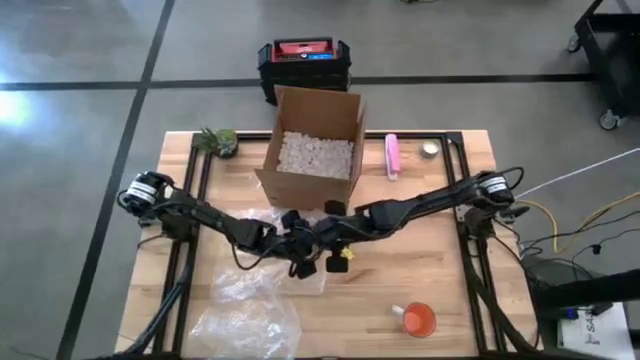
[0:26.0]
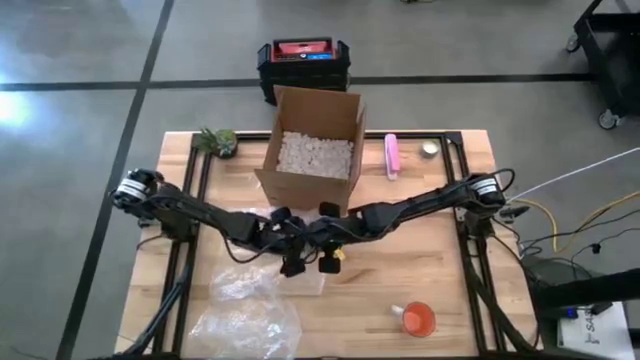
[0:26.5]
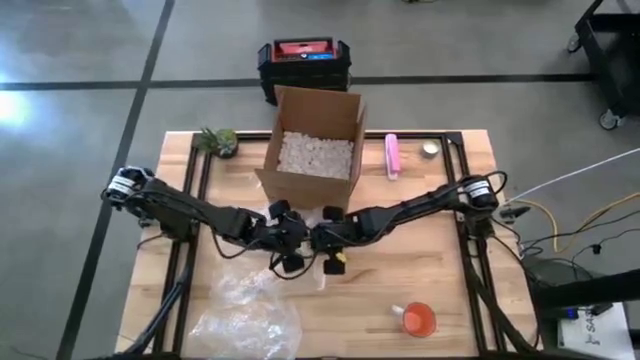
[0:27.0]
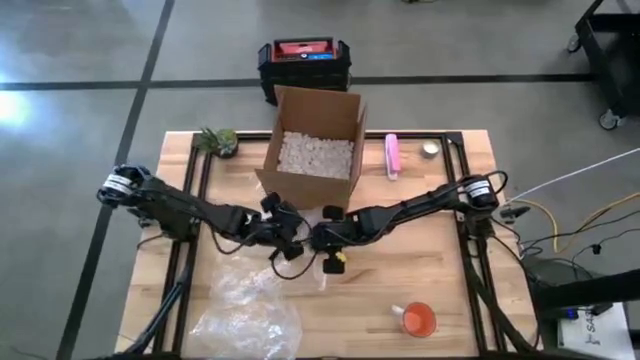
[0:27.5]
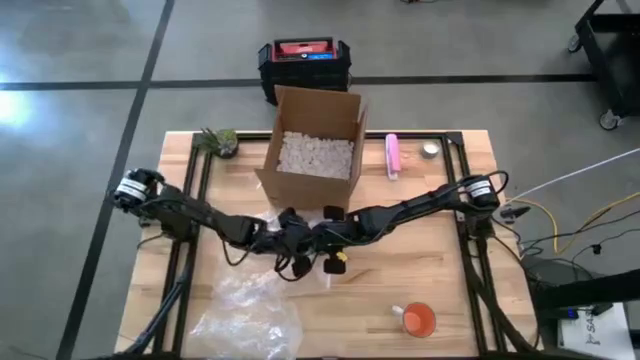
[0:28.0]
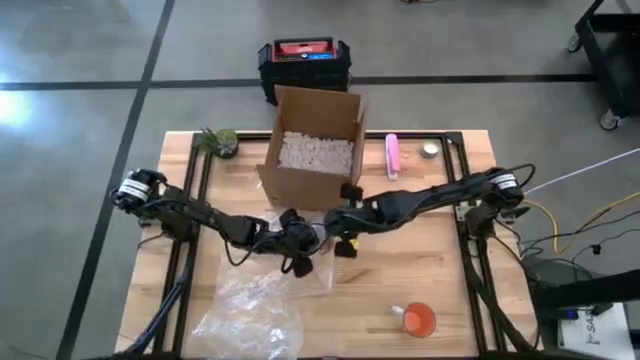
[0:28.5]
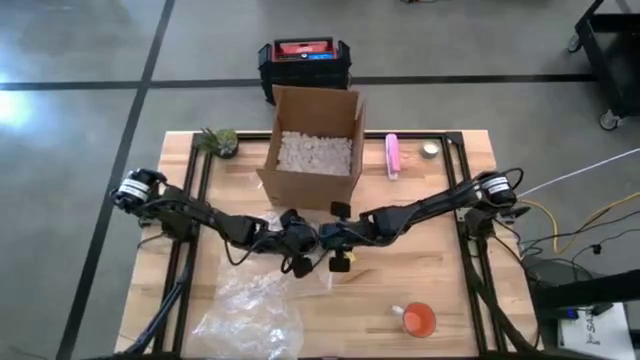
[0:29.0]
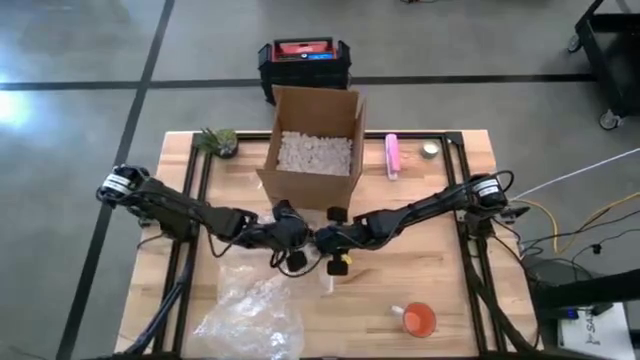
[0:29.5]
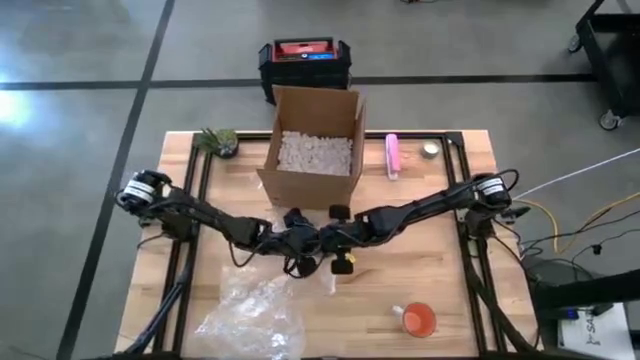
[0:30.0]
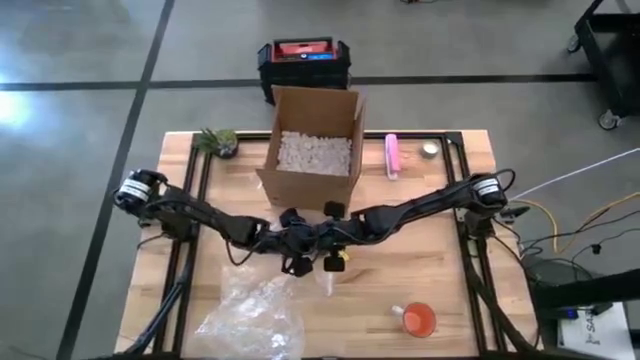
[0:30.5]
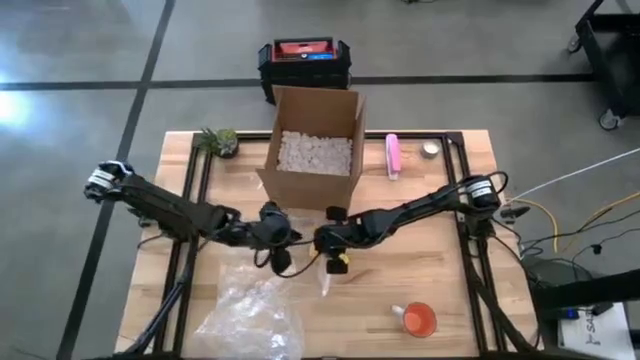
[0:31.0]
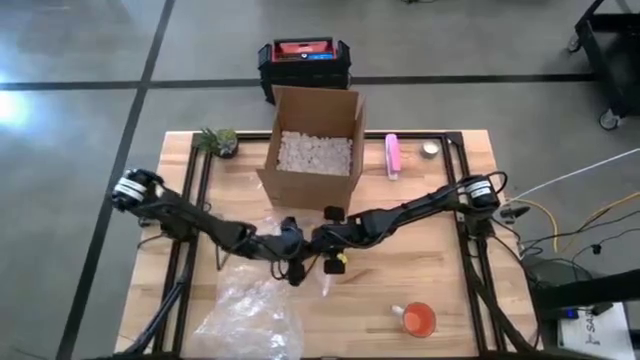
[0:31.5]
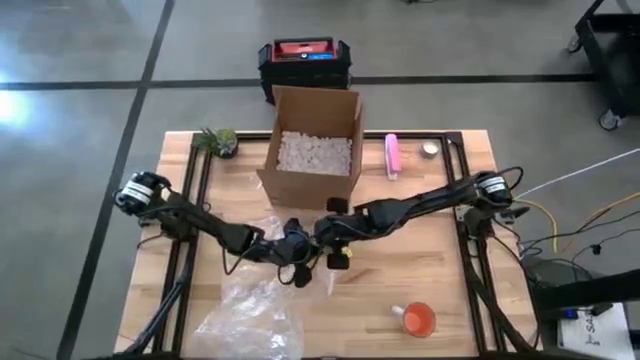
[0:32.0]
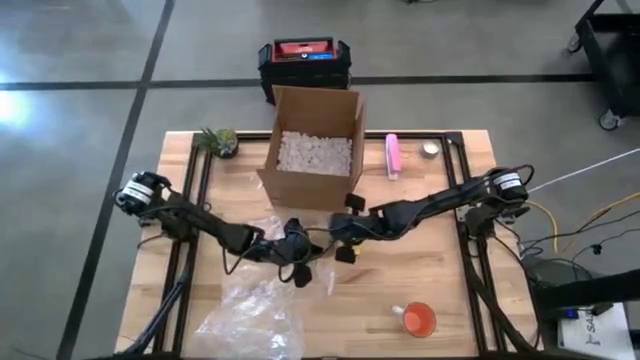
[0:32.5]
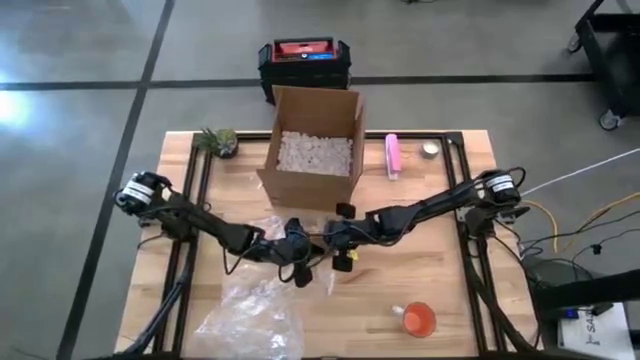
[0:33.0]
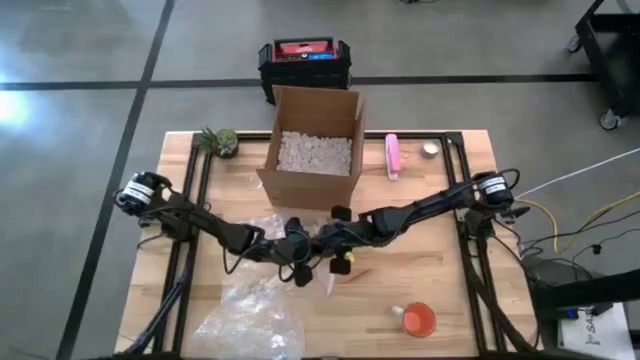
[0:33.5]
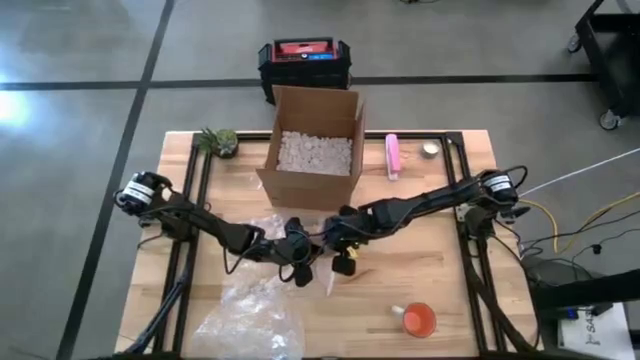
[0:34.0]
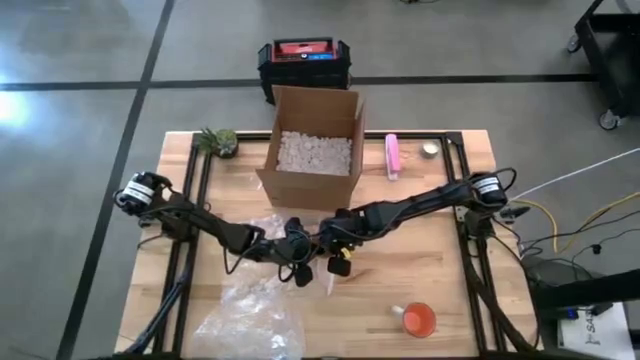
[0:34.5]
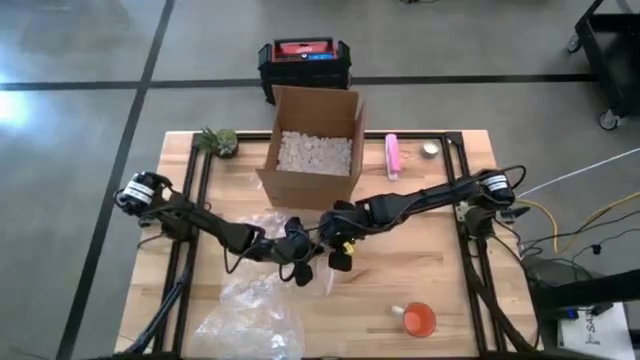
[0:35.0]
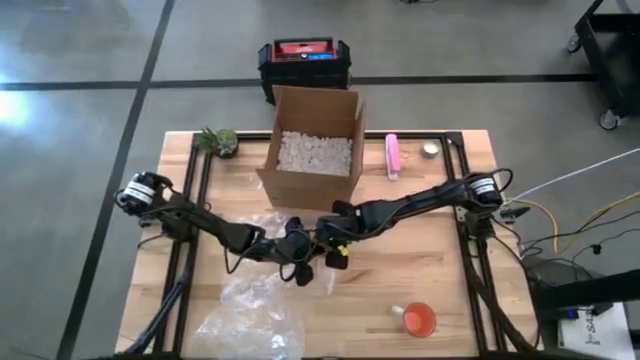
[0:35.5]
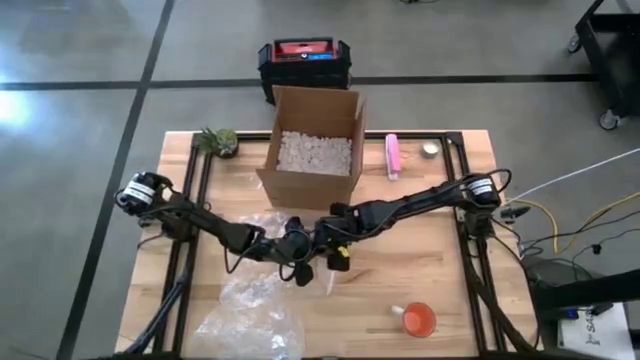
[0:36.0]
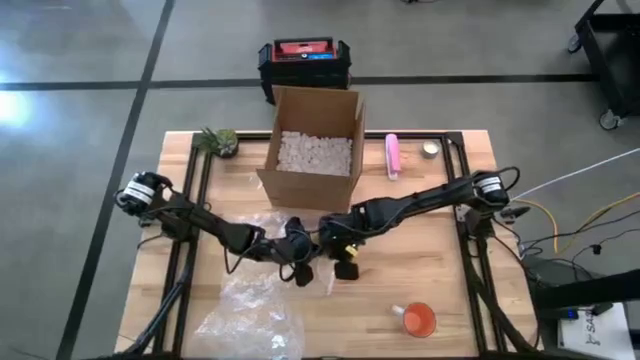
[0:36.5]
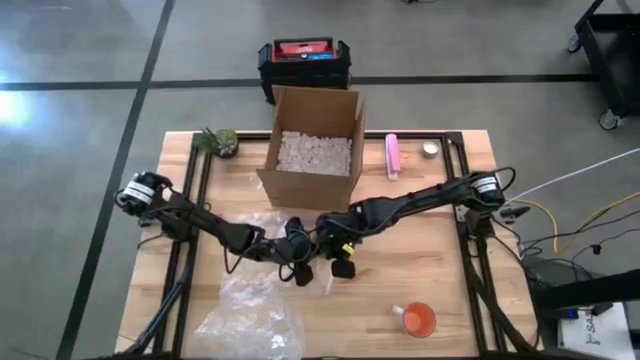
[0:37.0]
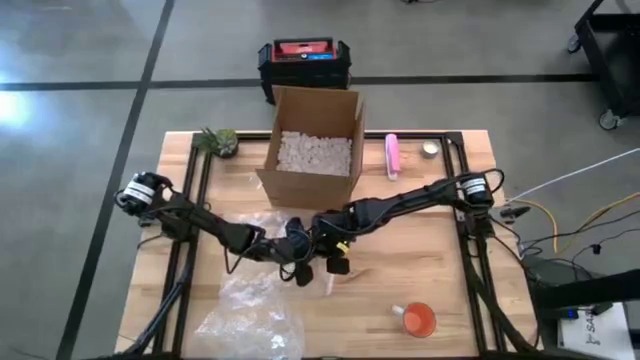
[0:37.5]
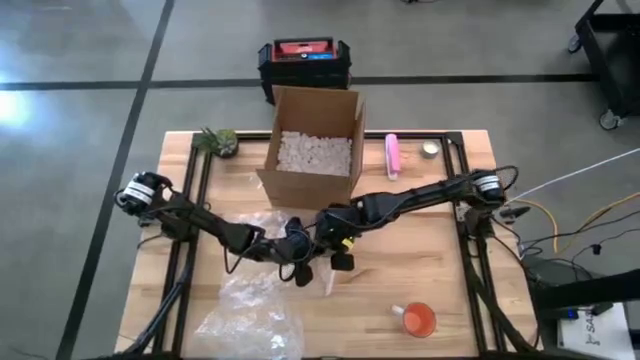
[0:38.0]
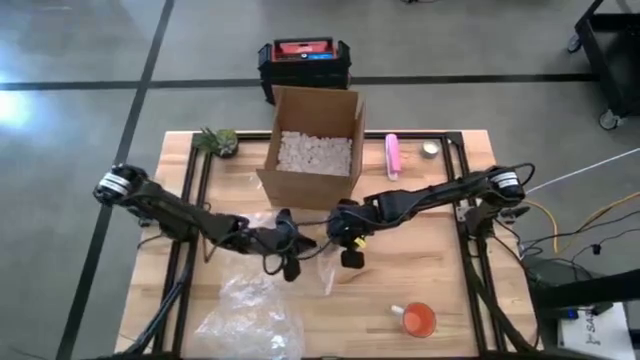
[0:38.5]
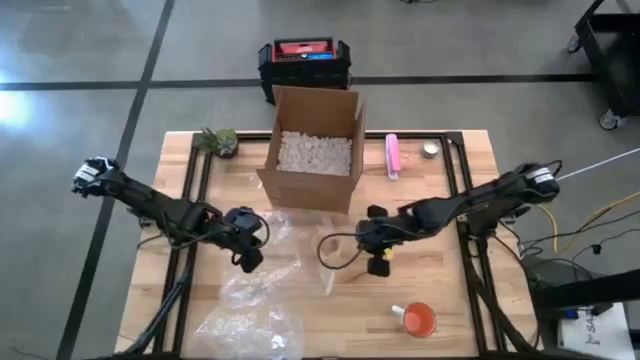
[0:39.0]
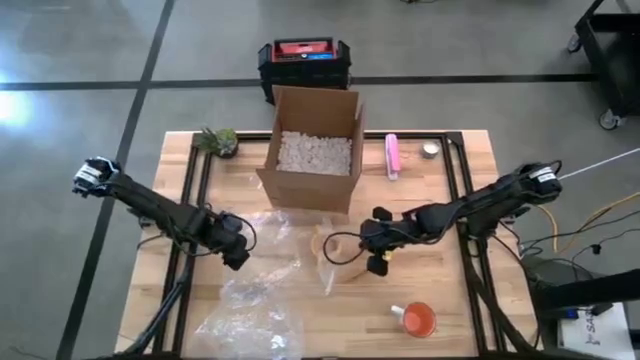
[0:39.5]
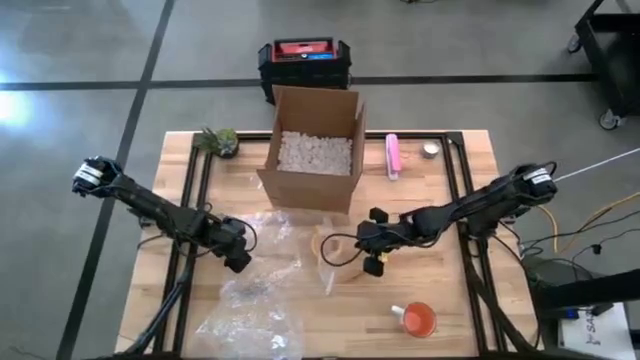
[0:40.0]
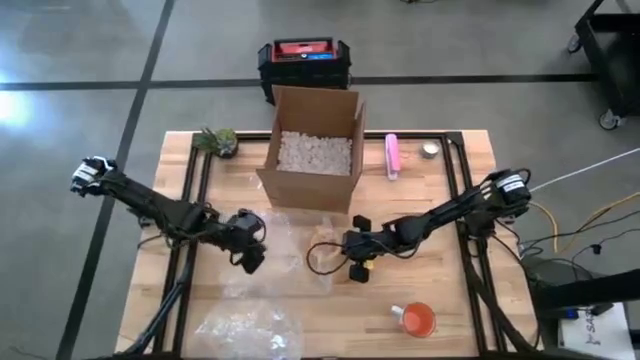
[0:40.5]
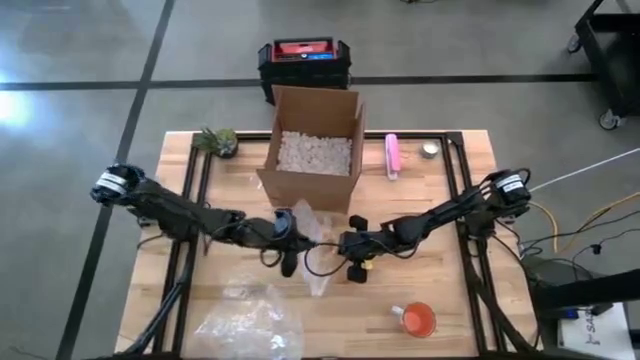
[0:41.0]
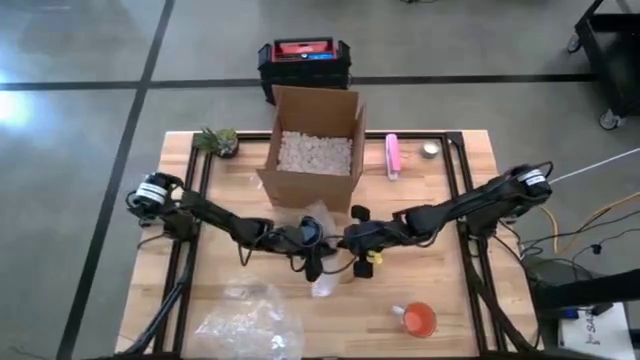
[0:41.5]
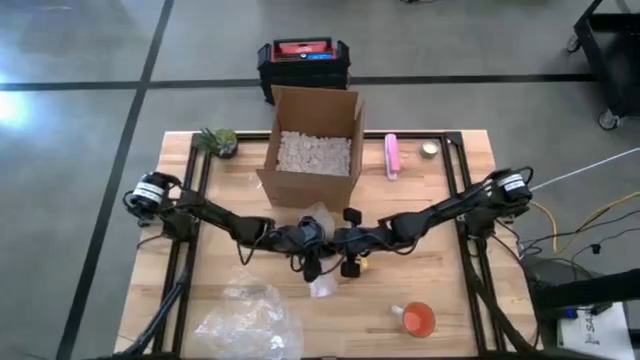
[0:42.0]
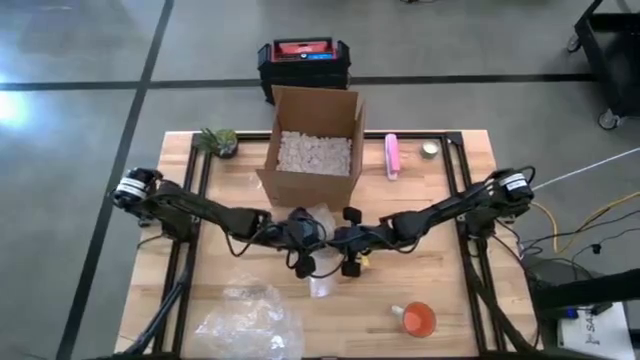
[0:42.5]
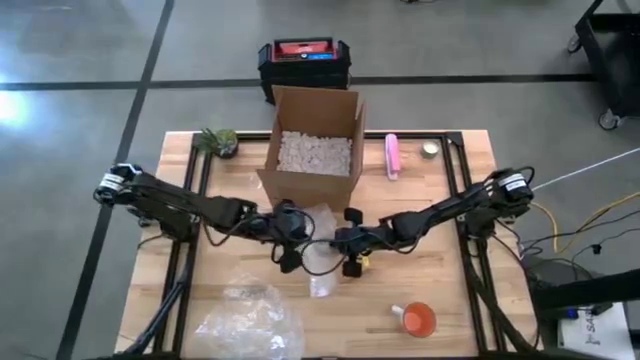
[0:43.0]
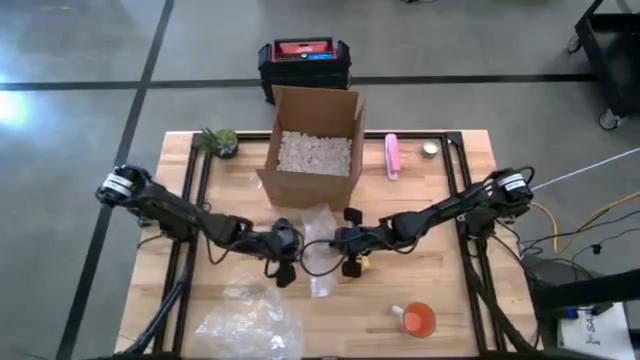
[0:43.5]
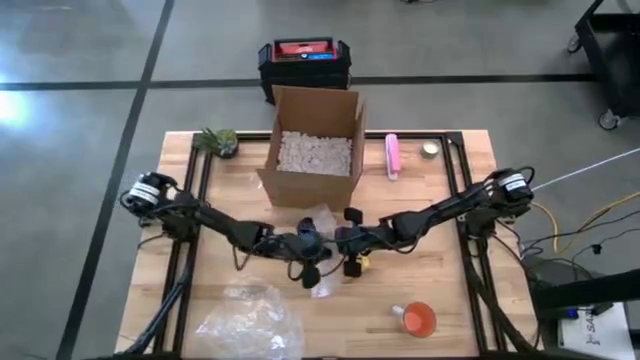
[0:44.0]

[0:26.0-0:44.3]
Task: wrap mug
Wrap the yellow mug with transparent bubble wrap

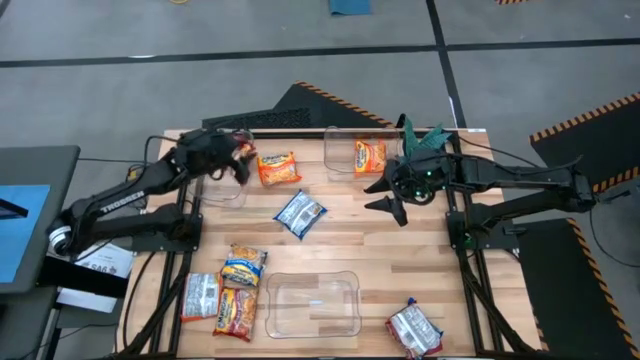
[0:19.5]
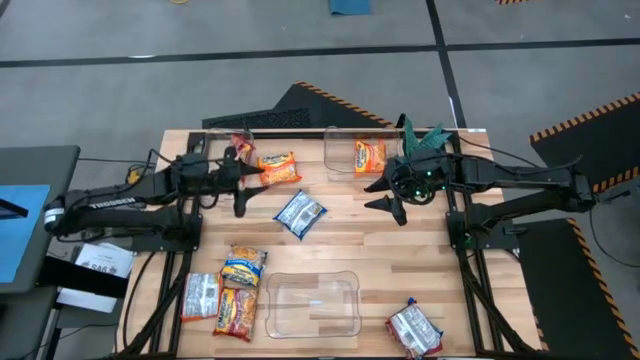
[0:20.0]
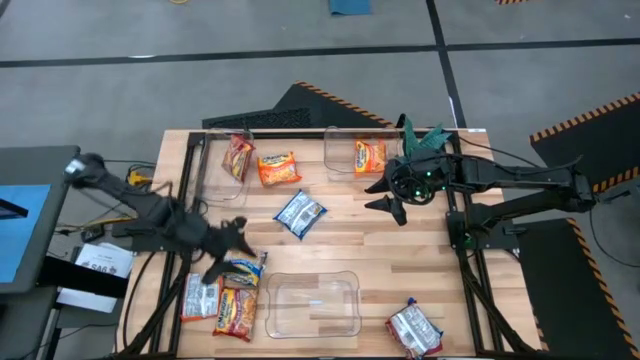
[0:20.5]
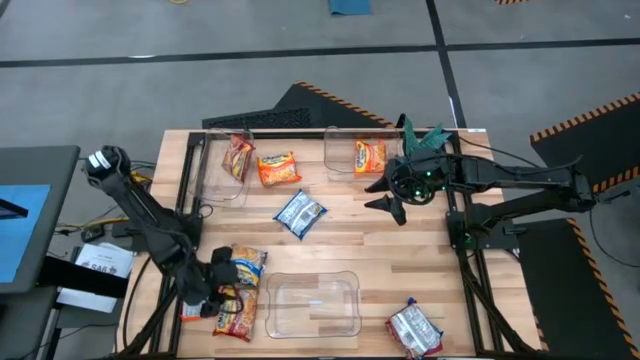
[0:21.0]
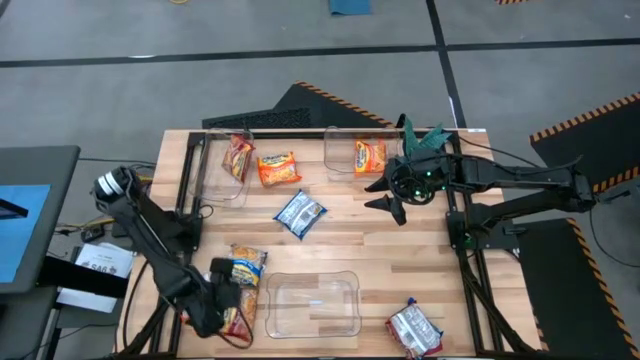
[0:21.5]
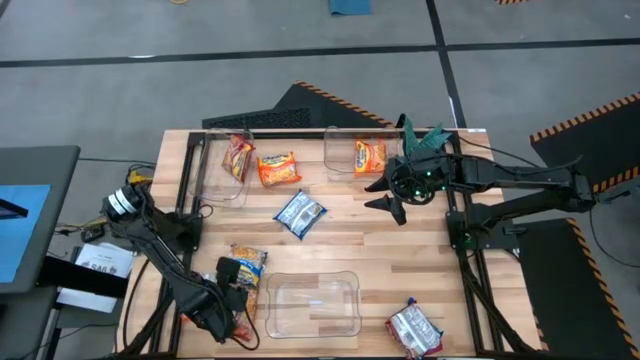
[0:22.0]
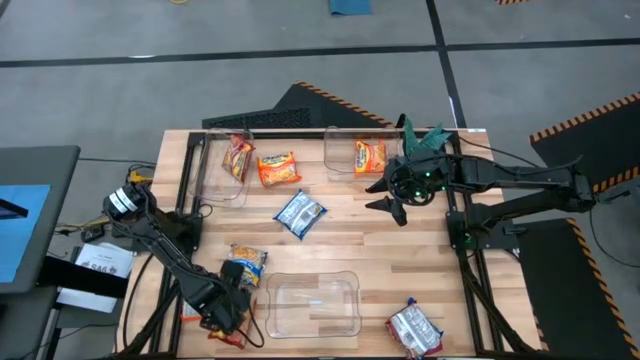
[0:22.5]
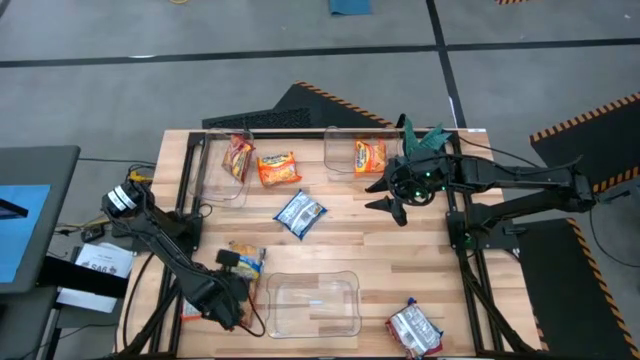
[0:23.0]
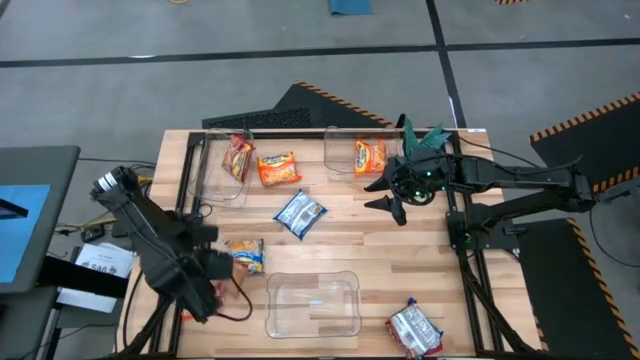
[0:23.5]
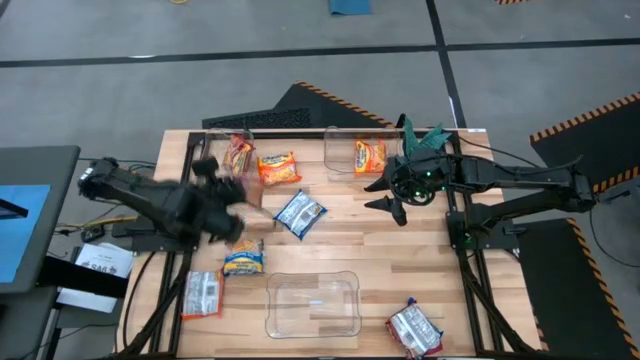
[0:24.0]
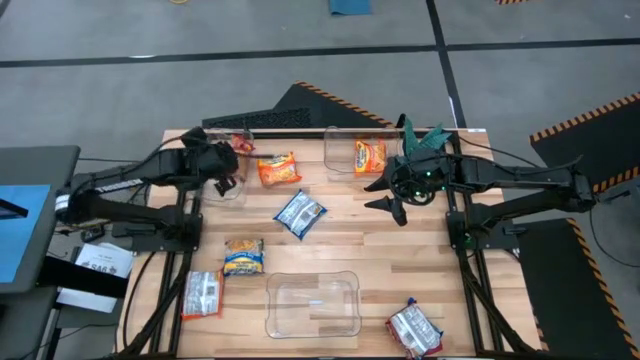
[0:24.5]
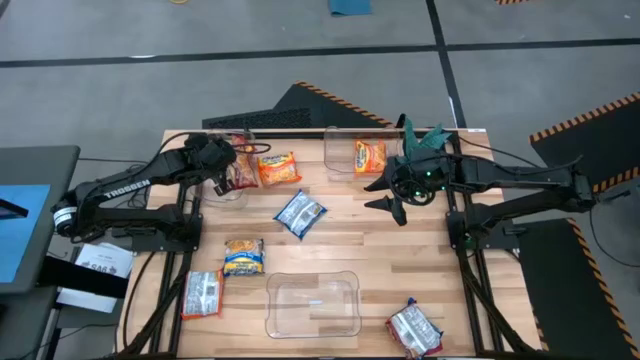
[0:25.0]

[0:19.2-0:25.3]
Task: Sort Maruchan noodles
Put the left red noodle pack into the top left transparent bin
